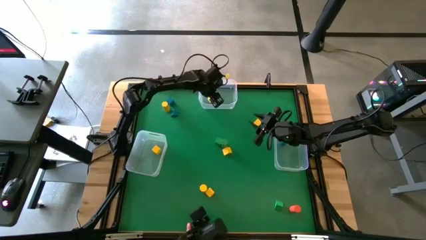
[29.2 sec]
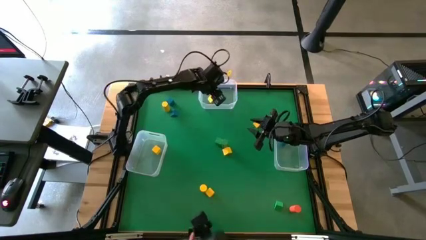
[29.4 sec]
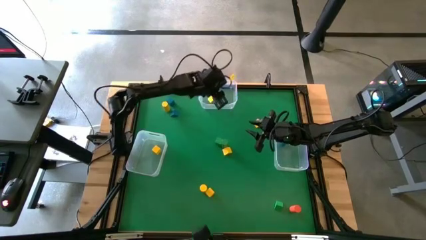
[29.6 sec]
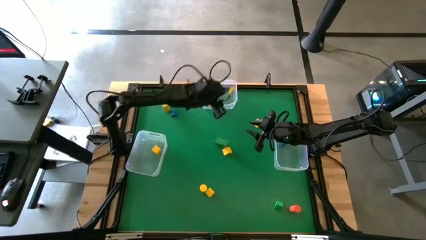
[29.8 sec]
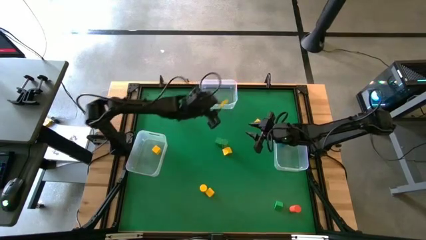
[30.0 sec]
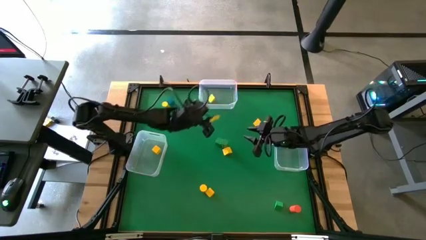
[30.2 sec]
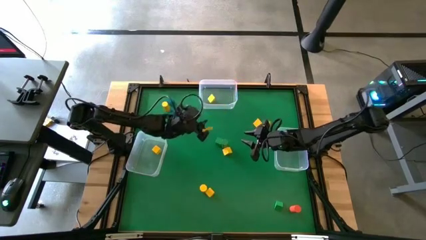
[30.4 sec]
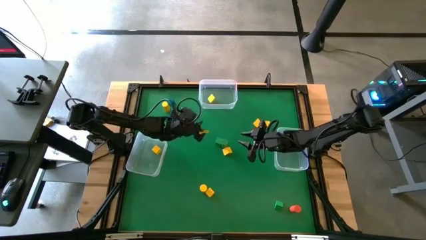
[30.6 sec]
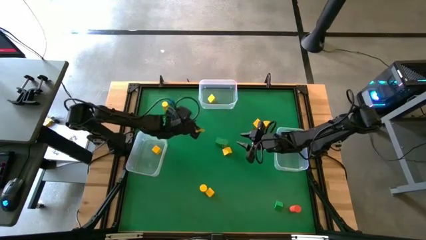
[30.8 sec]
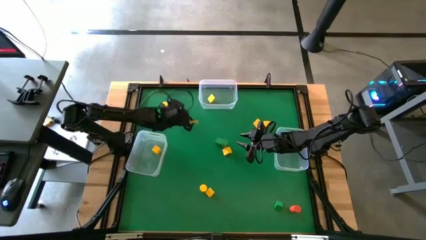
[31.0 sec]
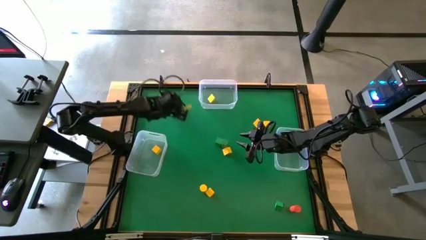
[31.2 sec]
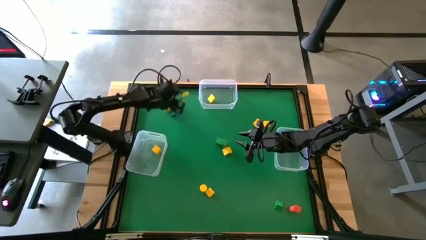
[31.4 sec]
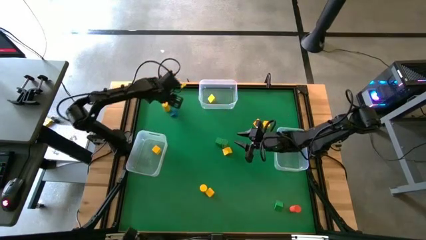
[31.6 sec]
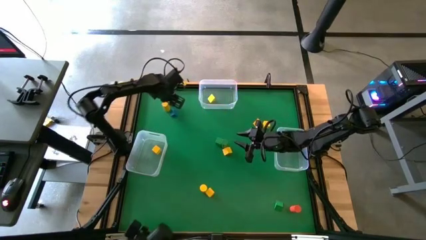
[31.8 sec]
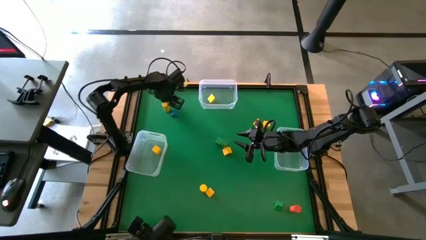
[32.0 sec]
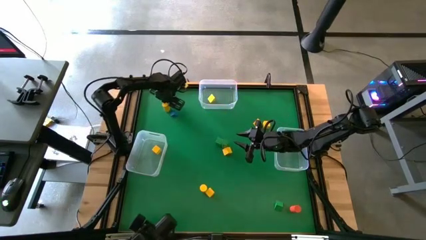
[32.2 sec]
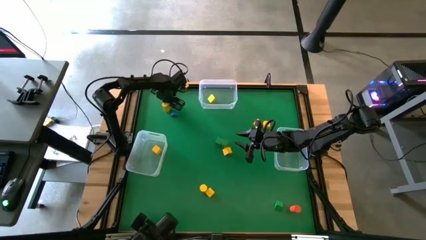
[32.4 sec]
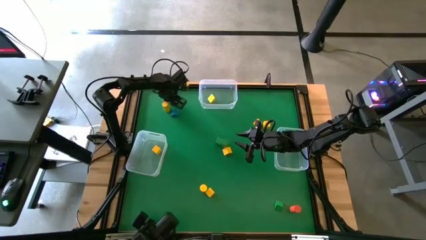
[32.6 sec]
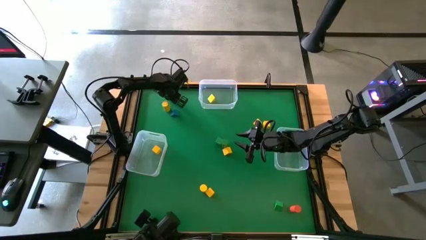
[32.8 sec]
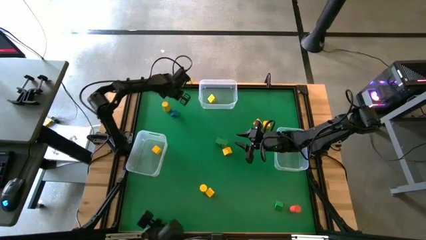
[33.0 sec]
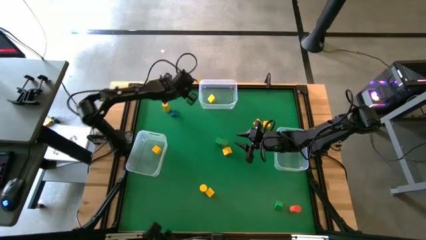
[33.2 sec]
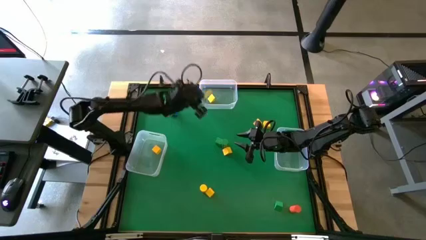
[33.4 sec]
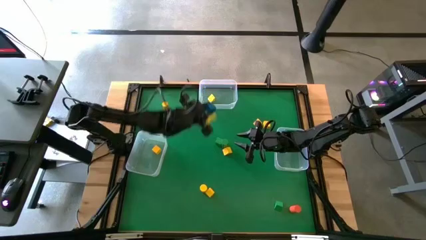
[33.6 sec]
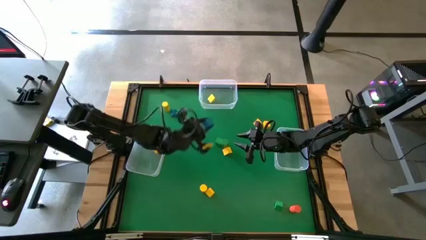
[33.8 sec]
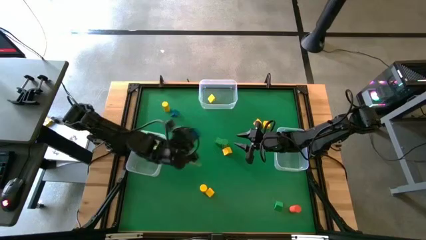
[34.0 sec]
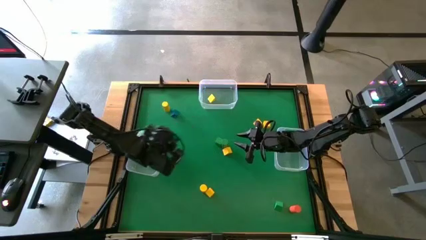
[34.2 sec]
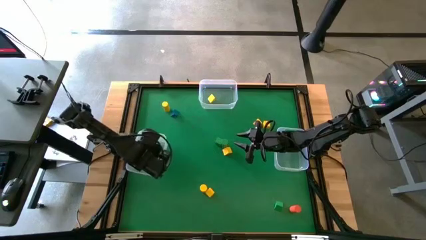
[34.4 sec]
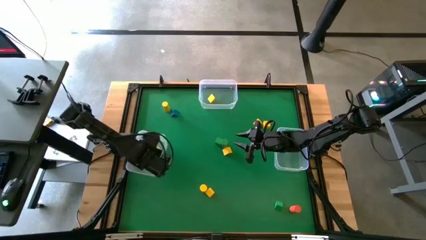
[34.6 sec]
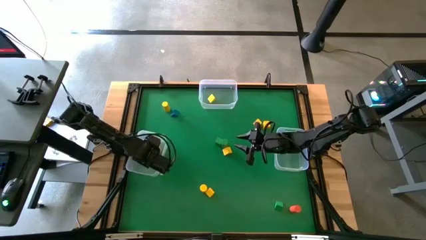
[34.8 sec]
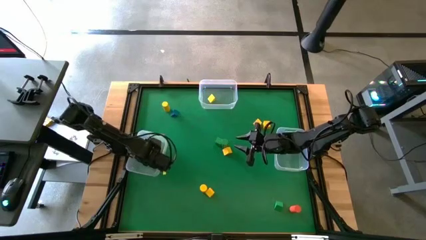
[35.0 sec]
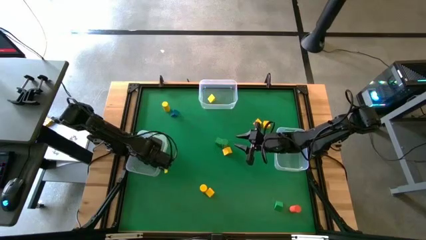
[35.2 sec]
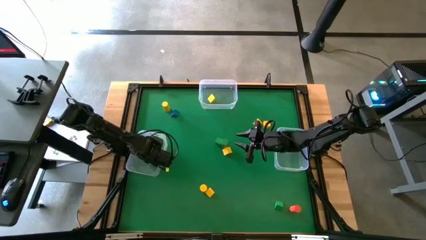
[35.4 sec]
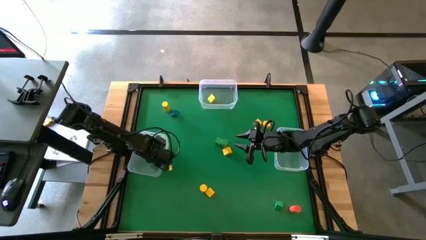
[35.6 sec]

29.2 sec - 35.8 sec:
Task: Sort blocks by size
Put the blue square block into the left transparent bin

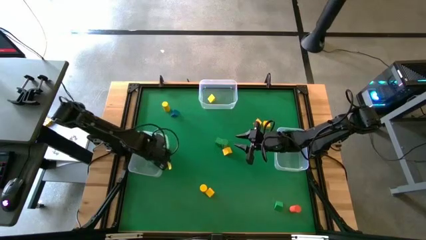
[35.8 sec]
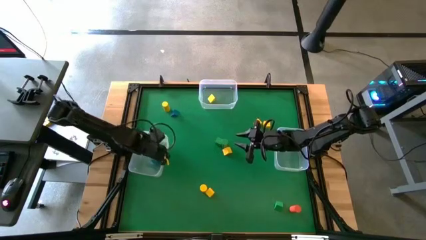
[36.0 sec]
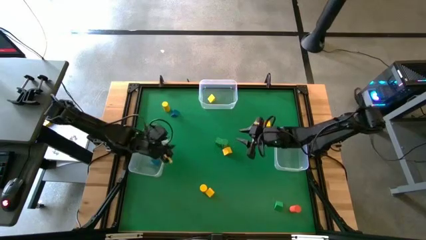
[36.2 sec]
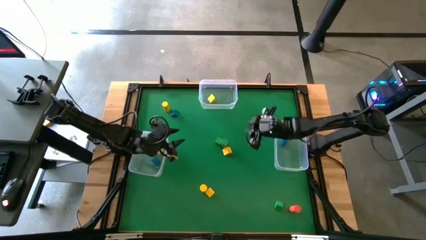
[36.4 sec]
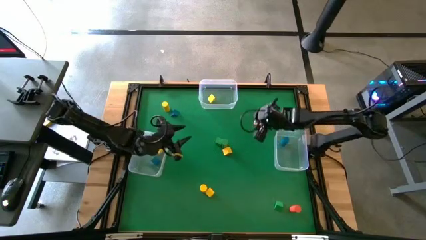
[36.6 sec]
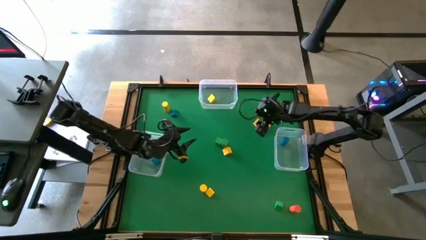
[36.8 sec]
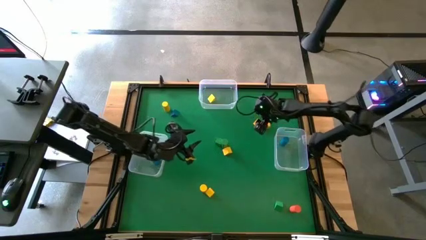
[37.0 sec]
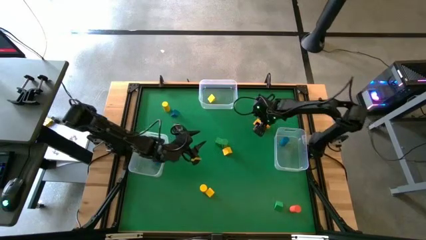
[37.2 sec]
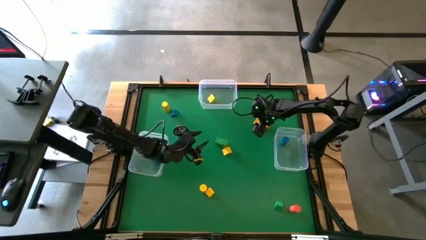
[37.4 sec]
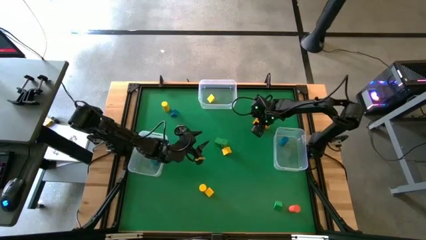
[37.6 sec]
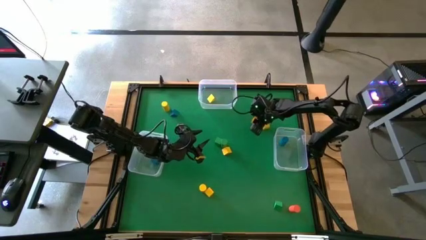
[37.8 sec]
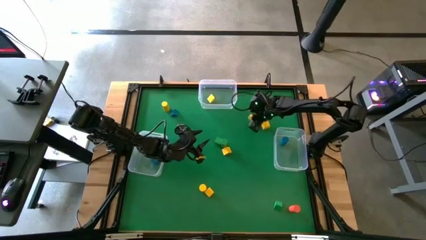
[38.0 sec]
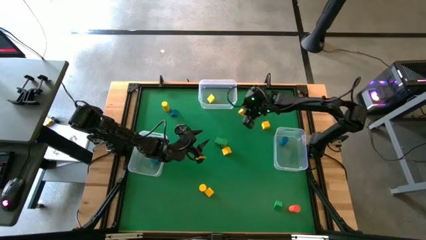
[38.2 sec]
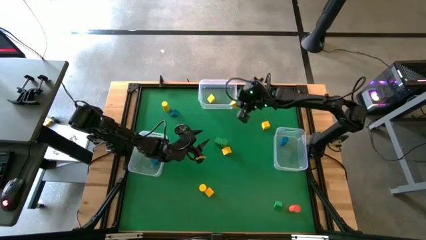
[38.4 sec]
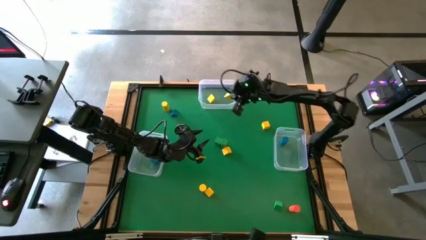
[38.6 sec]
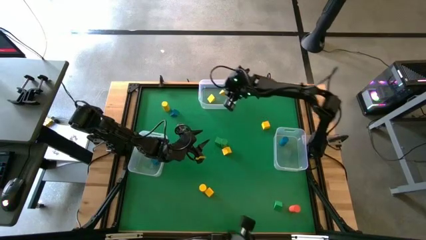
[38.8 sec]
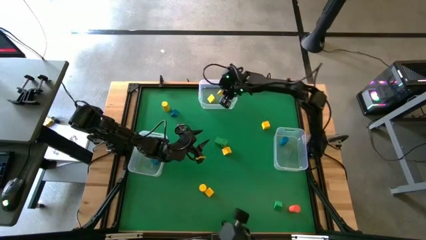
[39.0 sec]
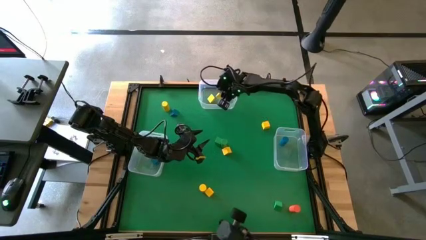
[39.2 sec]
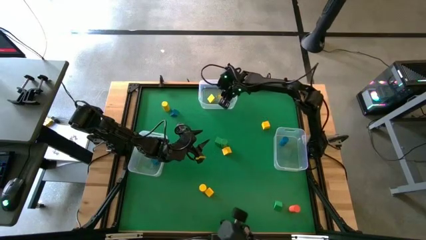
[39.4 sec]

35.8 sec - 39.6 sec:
Put the yellow triangle block into the top transparent bin

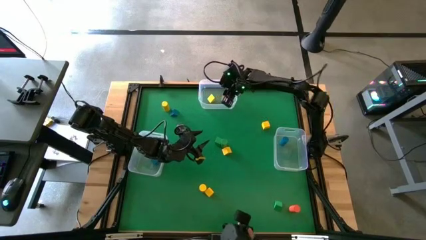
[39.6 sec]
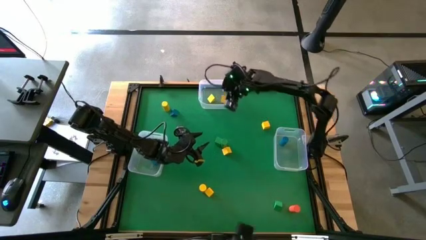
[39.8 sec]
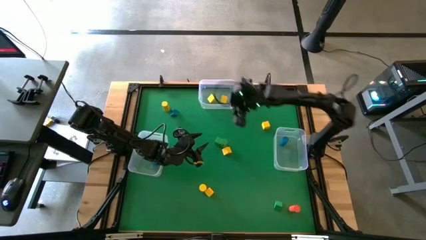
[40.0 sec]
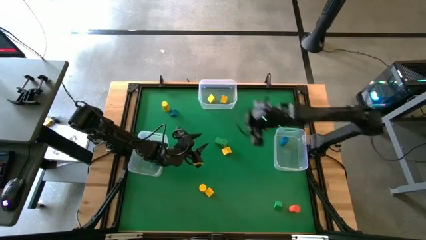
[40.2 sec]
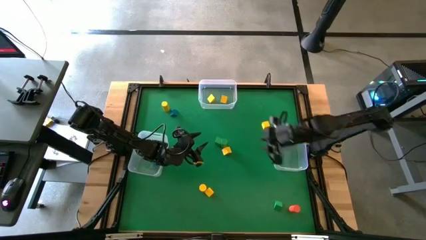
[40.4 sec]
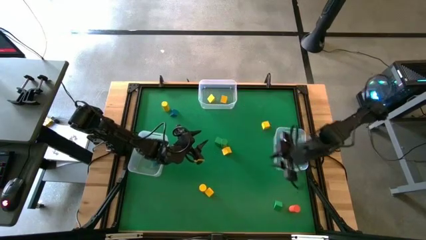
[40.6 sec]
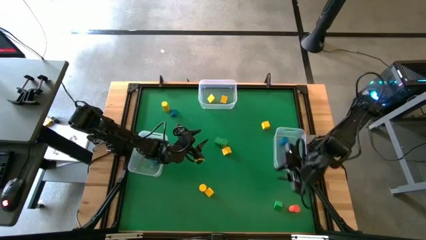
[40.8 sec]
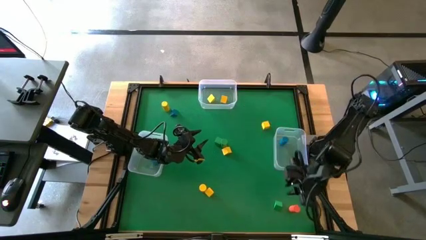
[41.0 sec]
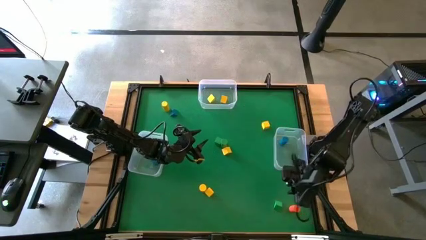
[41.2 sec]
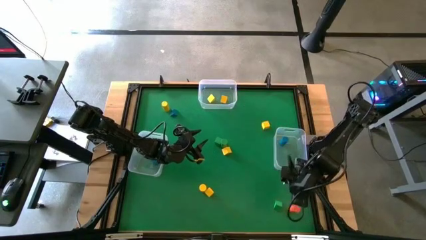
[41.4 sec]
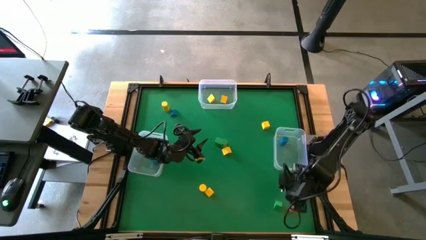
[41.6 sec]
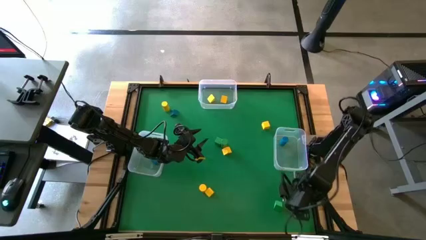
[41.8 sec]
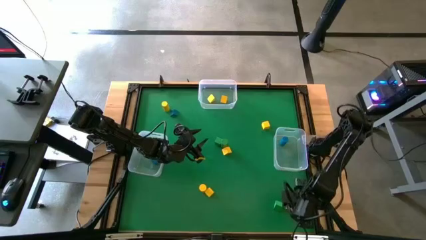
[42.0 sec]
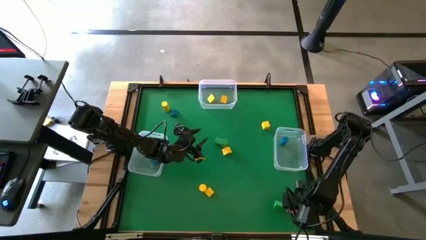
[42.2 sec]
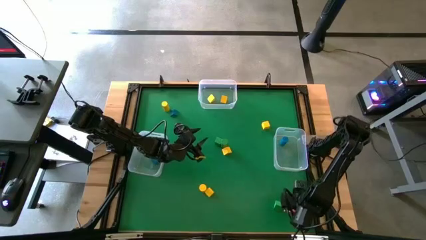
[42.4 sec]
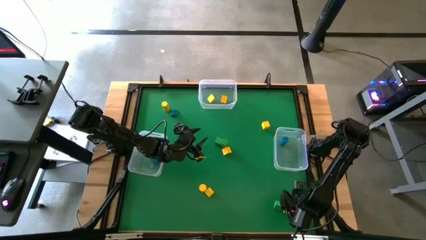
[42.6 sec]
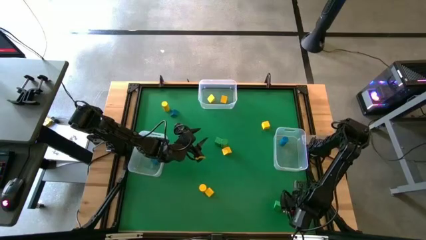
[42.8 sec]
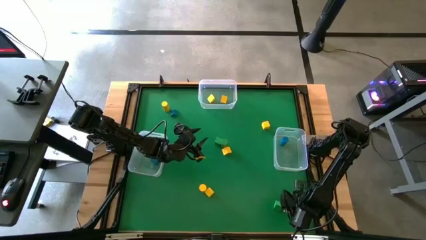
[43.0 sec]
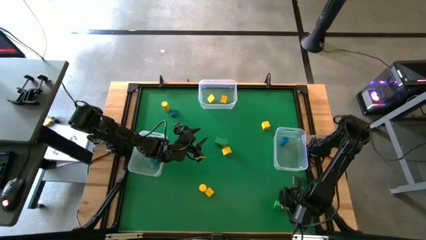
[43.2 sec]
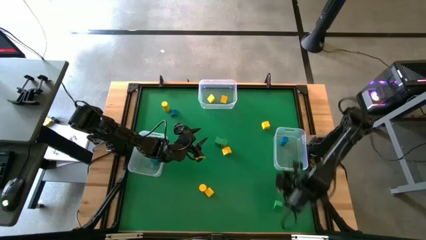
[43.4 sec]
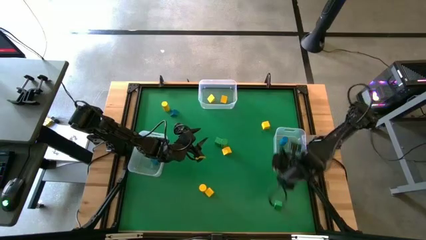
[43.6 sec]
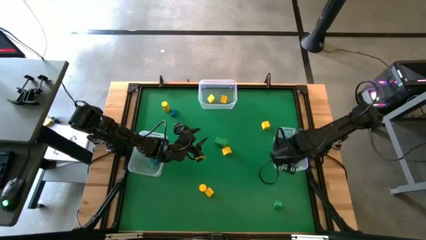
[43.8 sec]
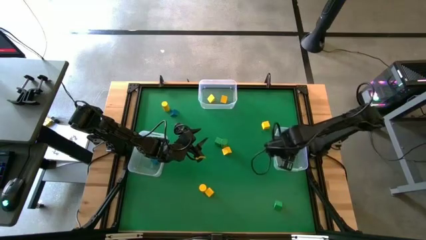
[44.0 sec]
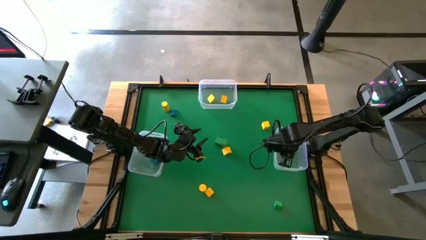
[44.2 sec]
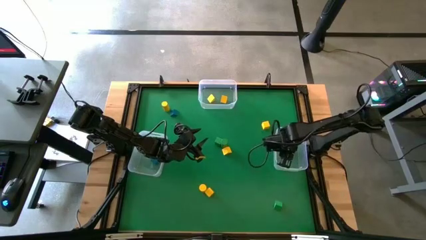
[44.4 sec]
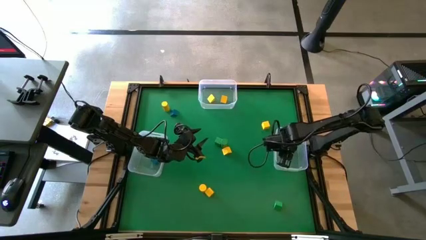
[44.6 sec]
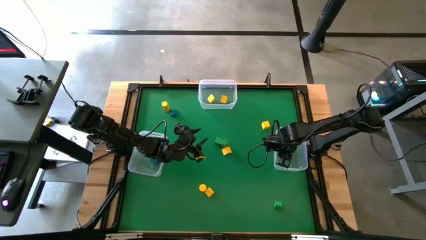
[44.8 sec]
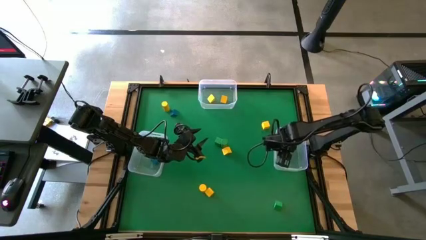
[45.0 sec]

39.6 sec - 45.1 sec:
Put the orange cylindrical block into the right transparent bin

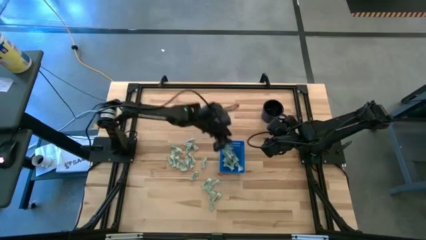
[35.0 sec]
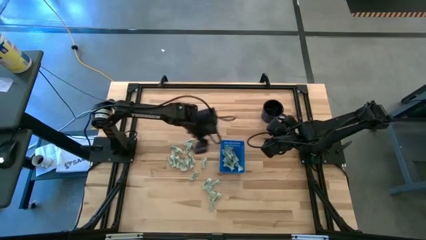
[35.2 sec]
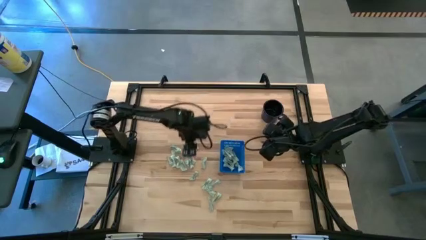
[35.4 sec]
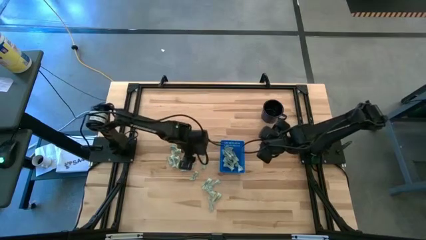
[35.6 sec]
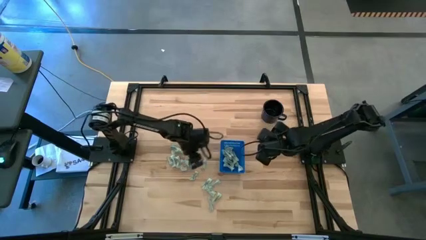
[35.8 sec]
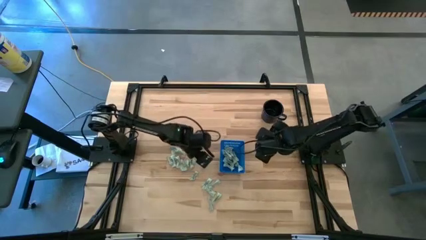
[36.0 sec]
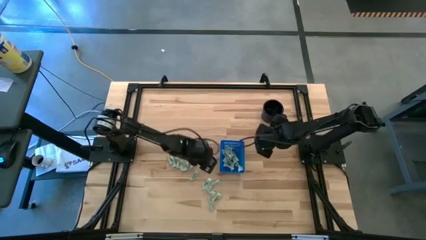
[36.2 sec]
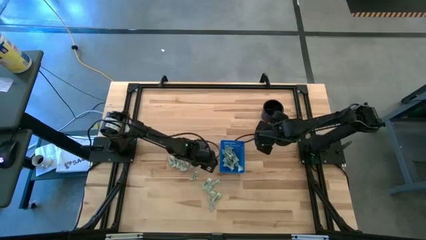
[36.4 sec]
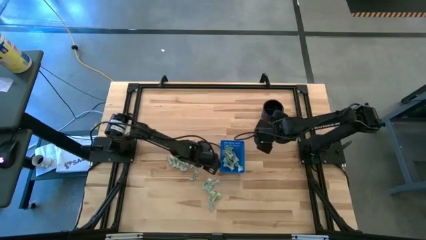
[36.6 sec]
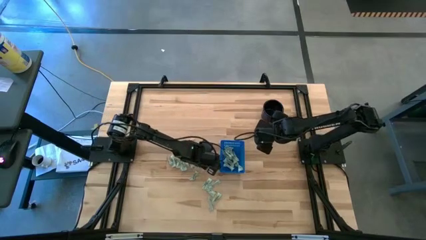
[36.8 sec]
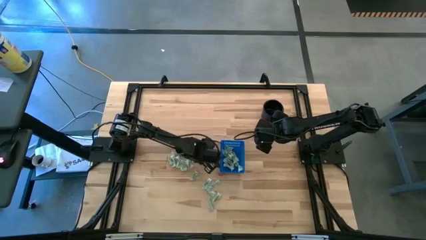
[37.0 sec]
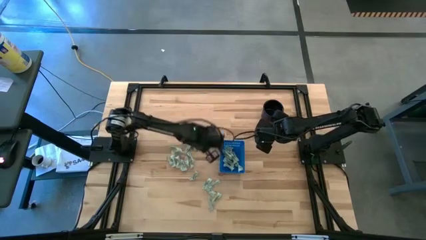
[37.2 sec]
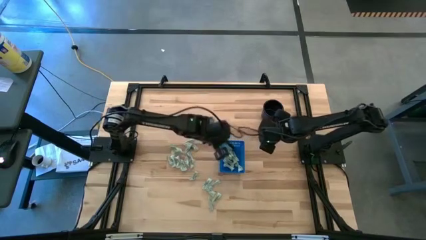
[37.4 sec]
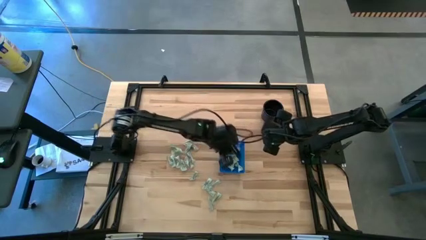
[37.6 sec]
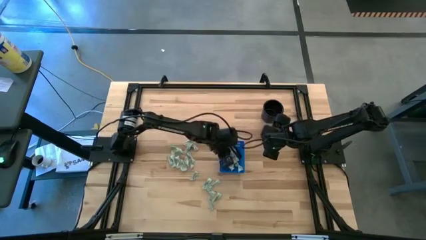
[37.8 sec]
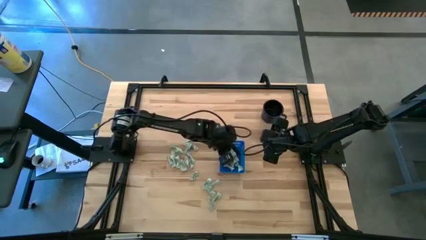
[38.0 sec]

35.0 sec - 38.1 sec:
Task: Pick and place Stevia / Truvia into bins
Put the stevia packet into the basket
